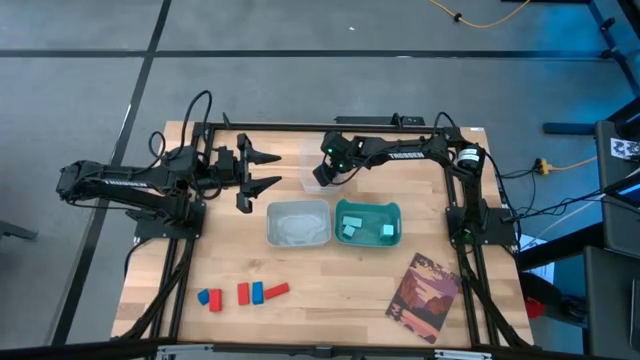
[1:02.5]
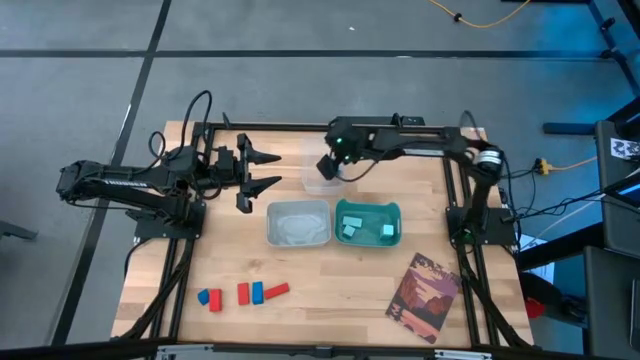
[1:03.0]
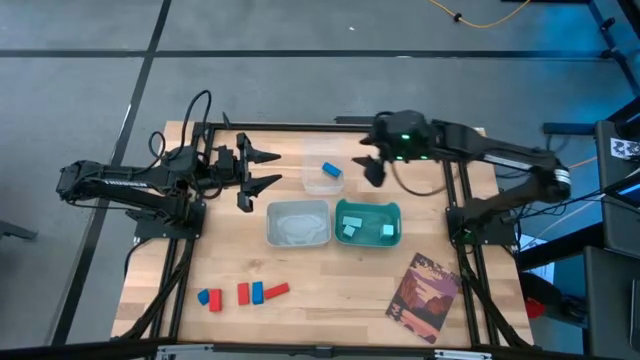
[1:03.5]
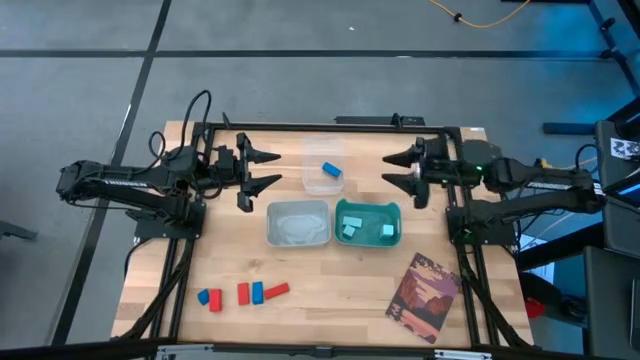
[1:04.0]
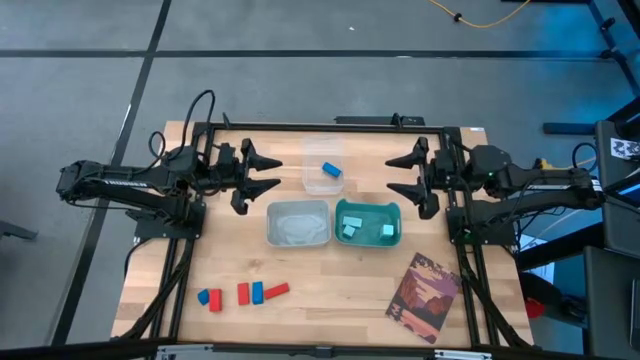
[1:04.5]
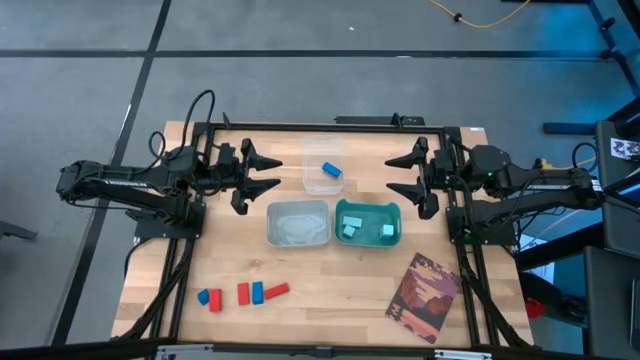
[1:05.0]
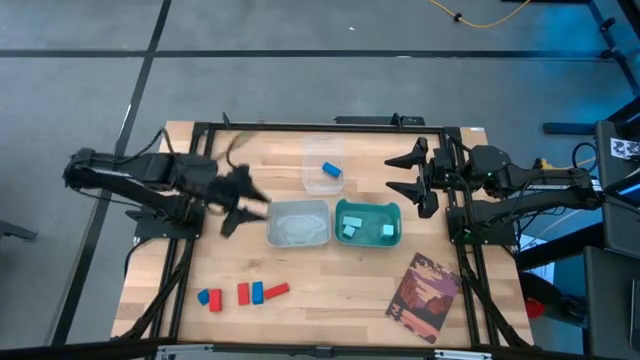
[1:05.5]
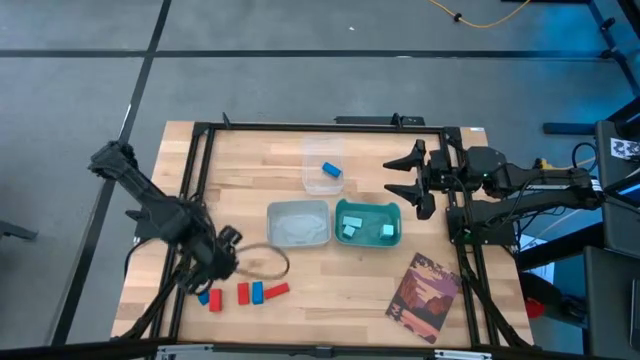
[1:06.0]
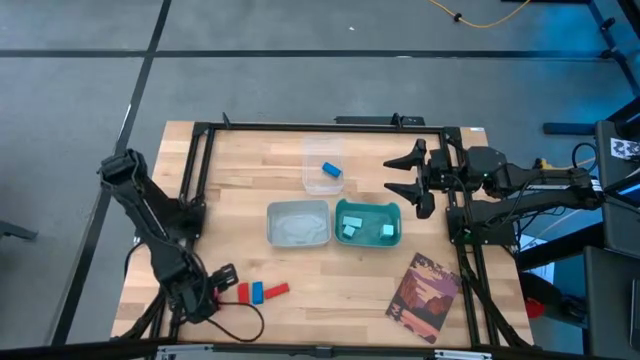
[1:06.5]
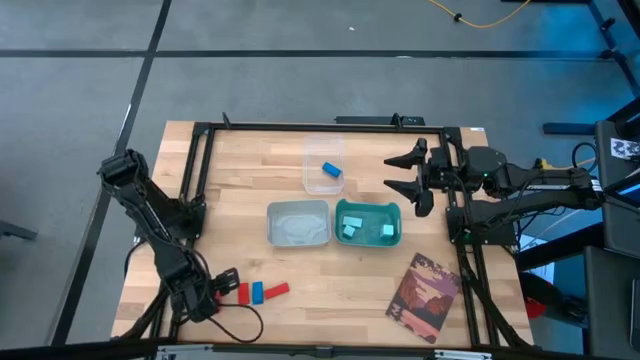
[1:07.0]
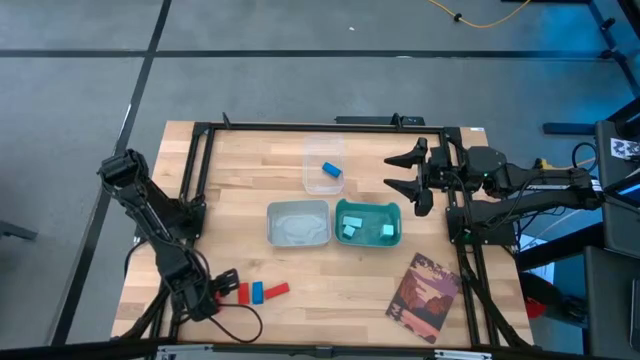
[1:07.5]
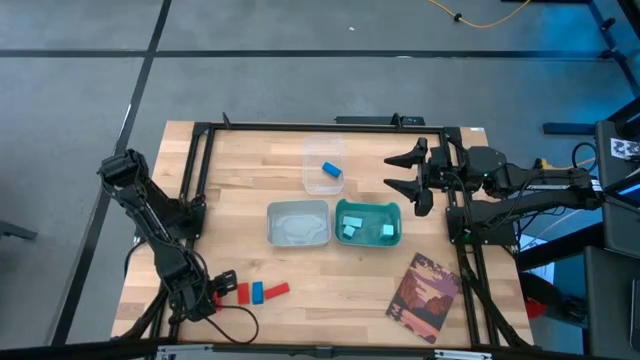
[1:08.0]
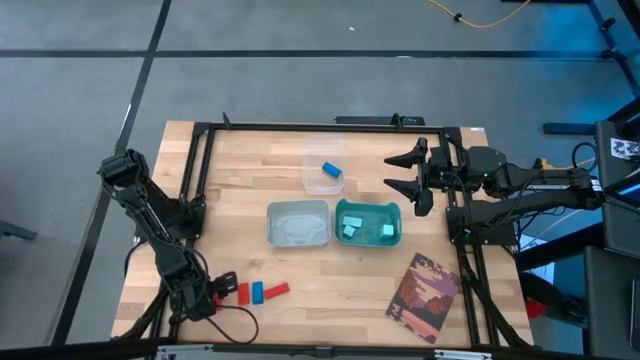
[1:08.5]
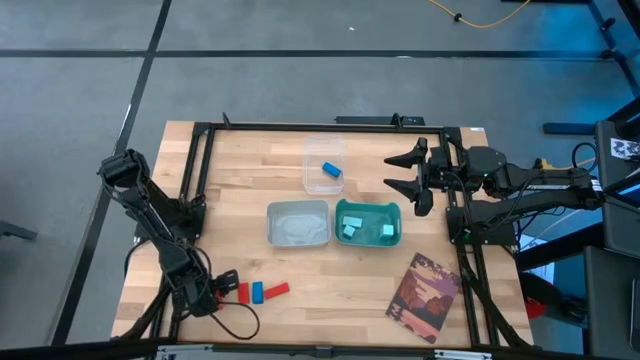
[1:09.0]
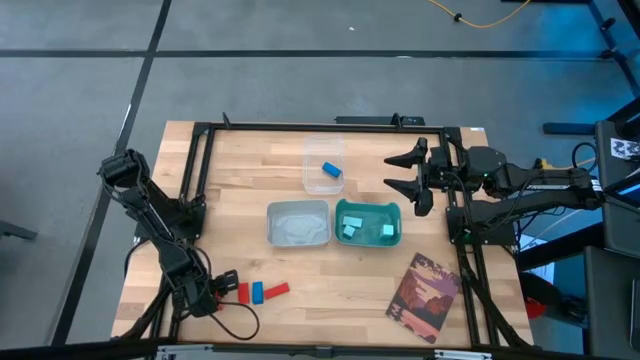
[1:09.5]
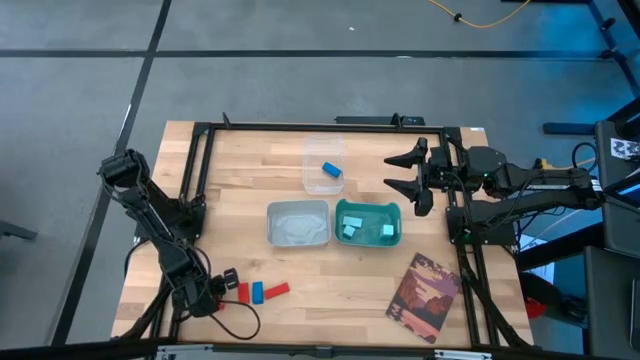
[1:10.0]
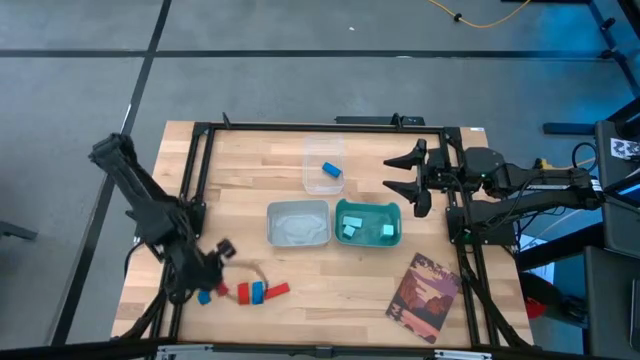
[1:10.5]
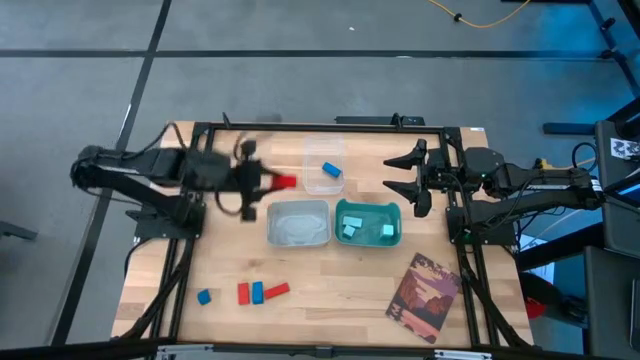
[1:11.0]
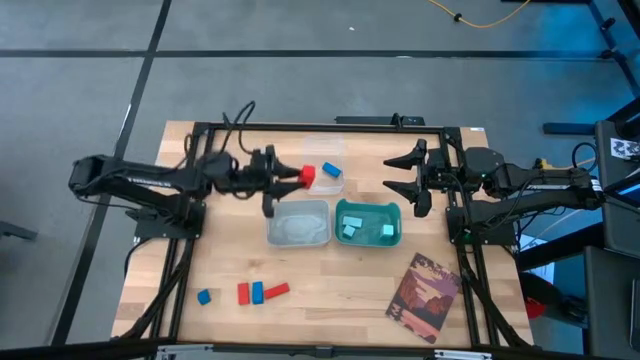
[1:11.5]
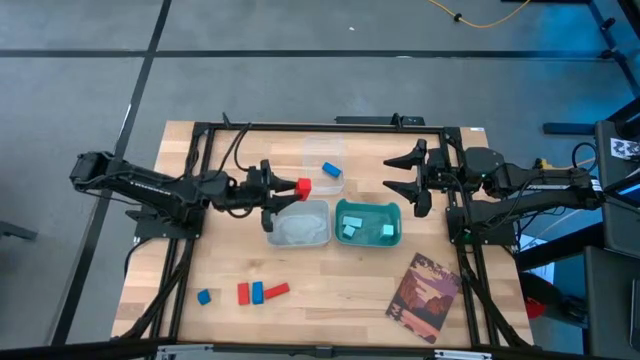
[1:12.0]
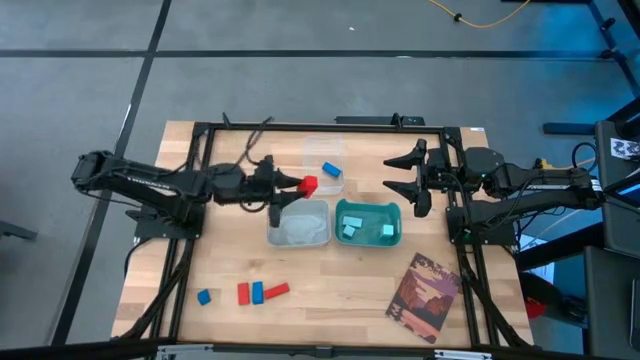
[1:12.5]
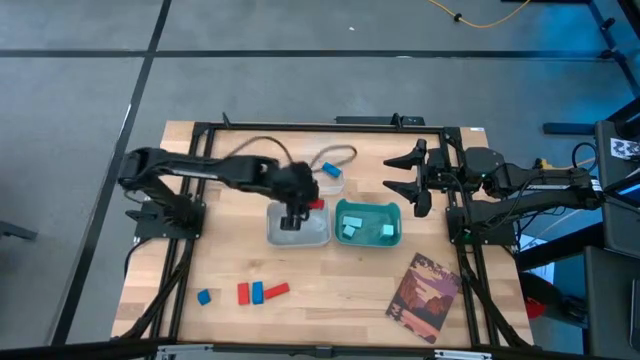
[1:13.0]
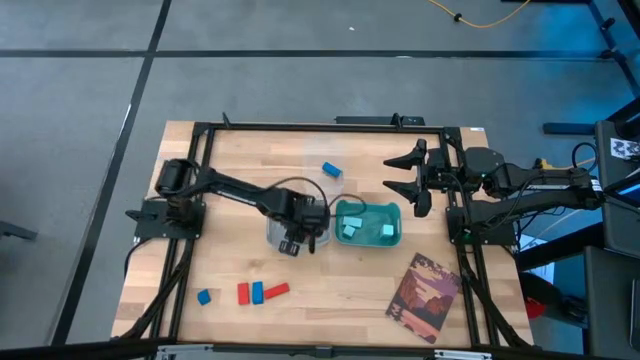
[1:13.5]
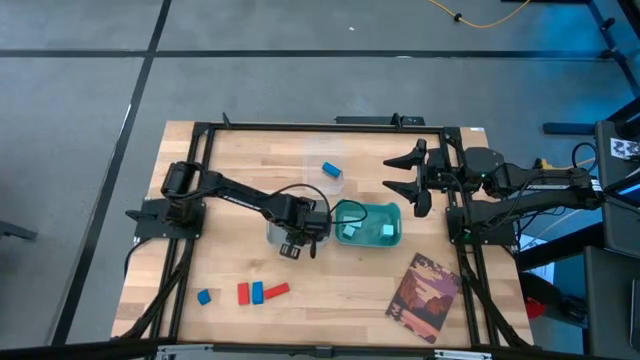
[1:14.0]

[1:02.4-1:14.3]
Task: Sort & place blocks by color
Put the left red block into the gray bin

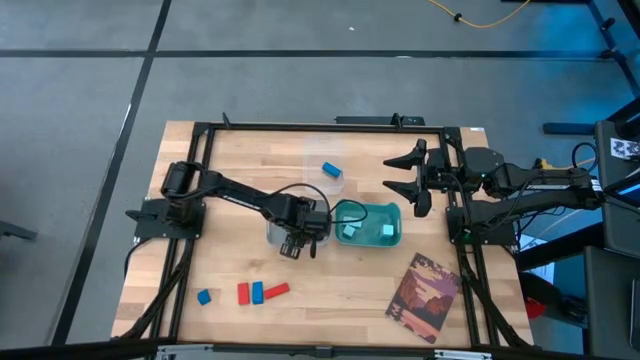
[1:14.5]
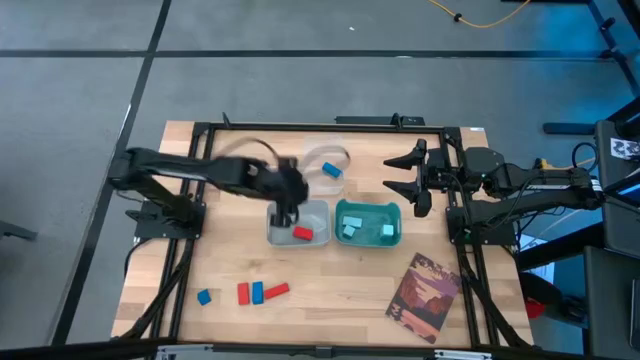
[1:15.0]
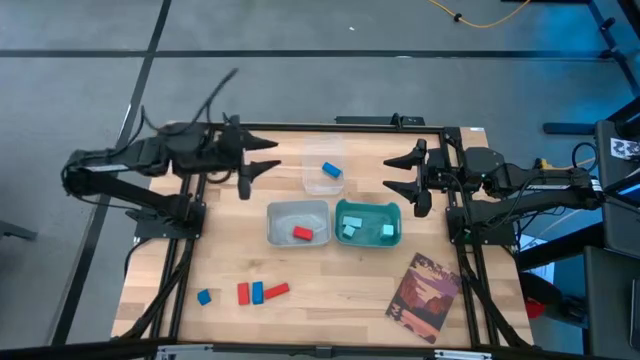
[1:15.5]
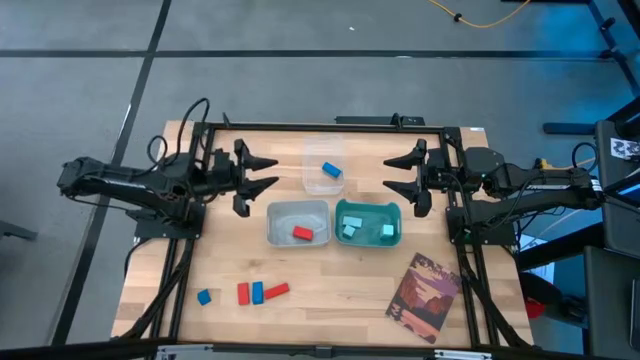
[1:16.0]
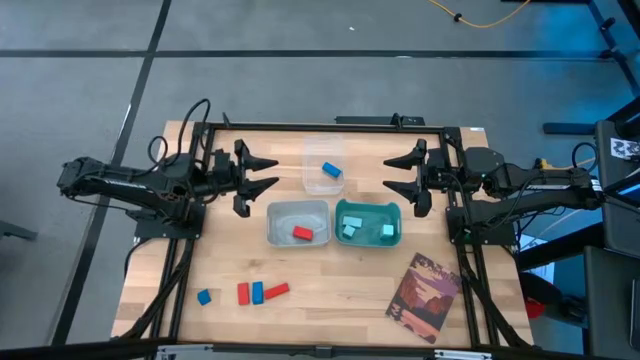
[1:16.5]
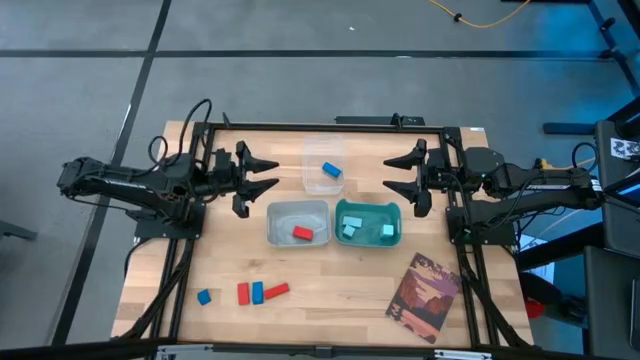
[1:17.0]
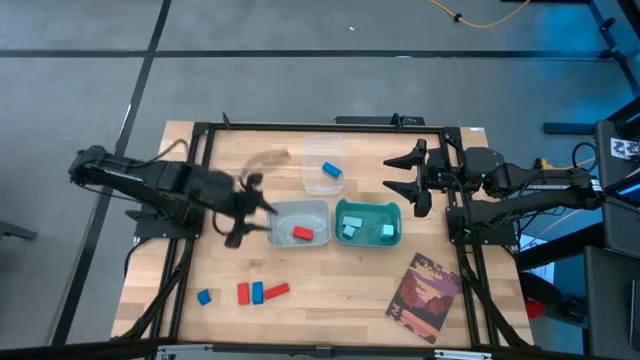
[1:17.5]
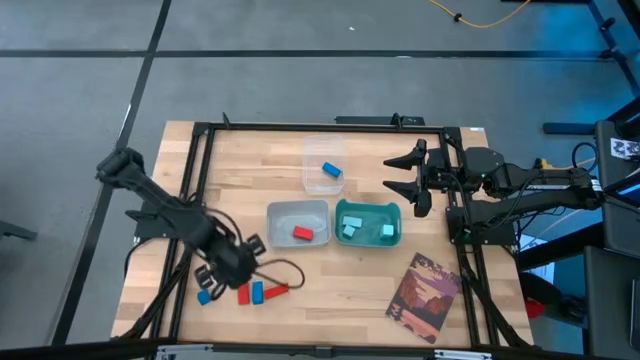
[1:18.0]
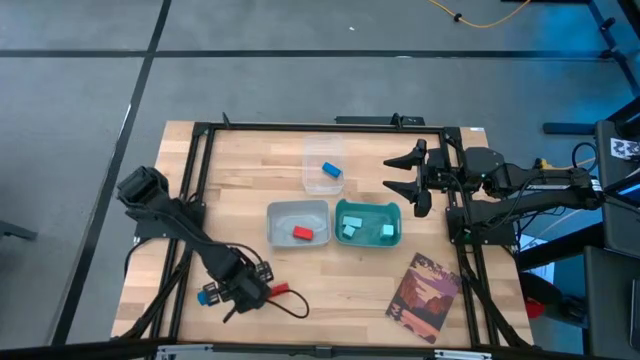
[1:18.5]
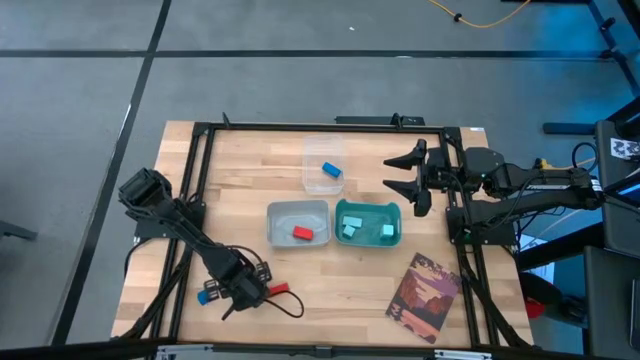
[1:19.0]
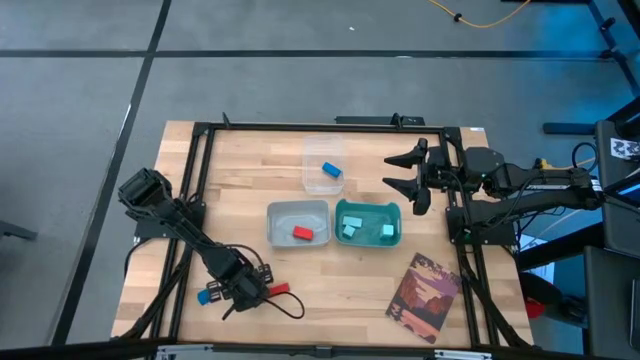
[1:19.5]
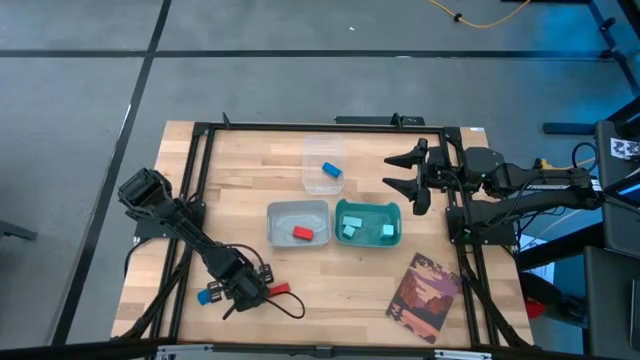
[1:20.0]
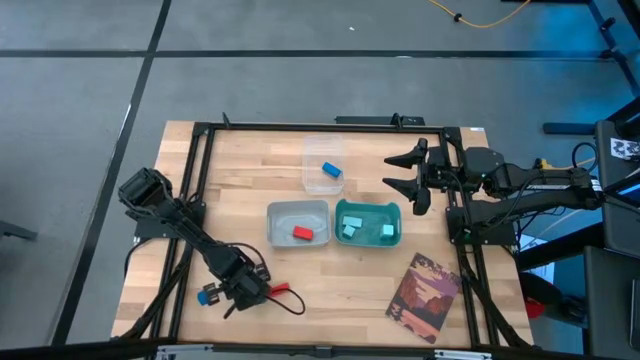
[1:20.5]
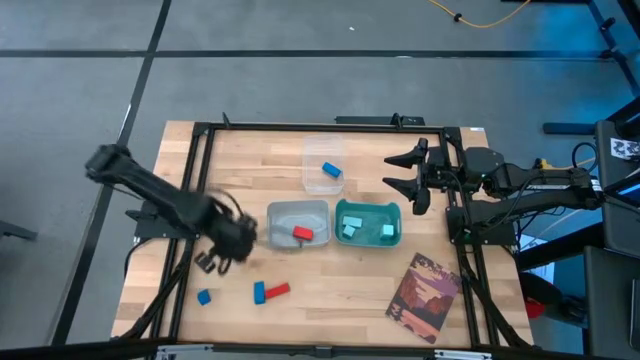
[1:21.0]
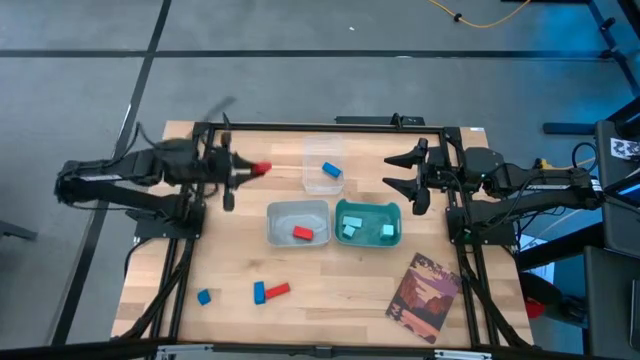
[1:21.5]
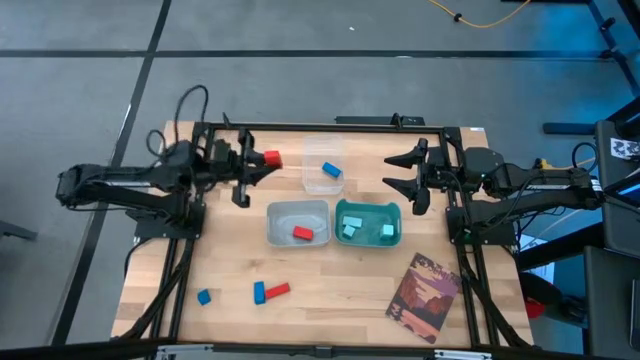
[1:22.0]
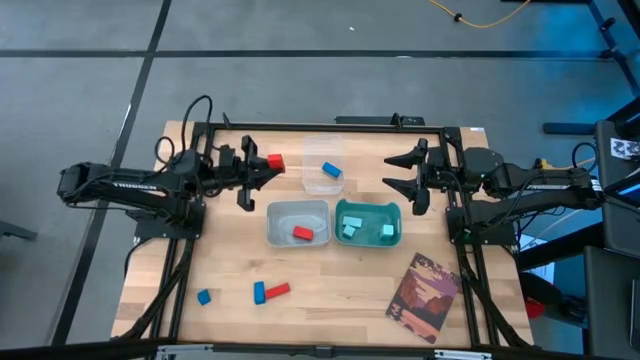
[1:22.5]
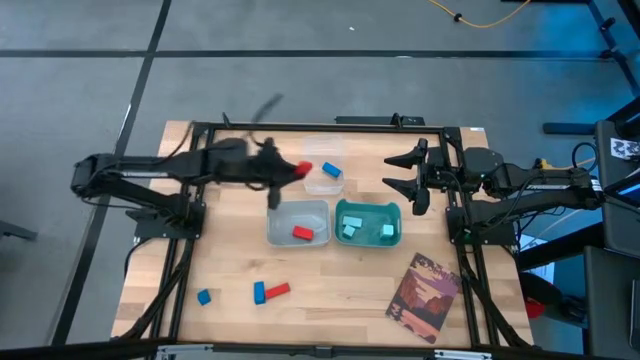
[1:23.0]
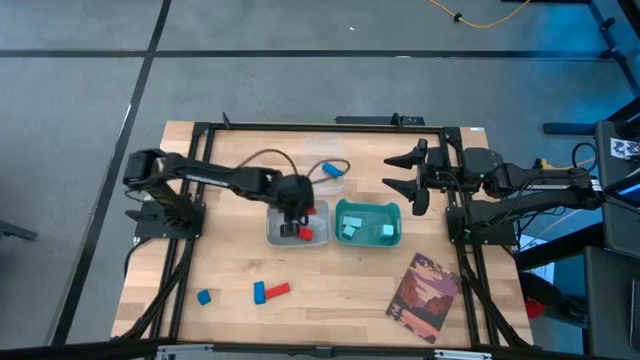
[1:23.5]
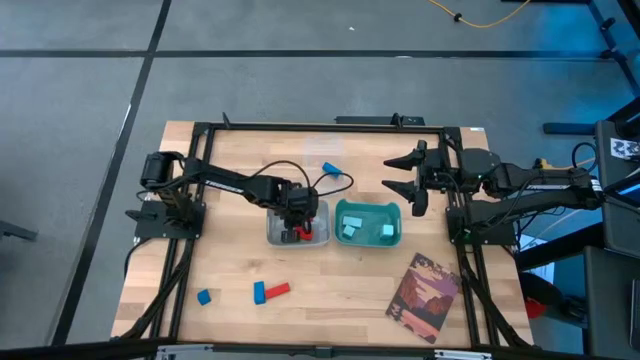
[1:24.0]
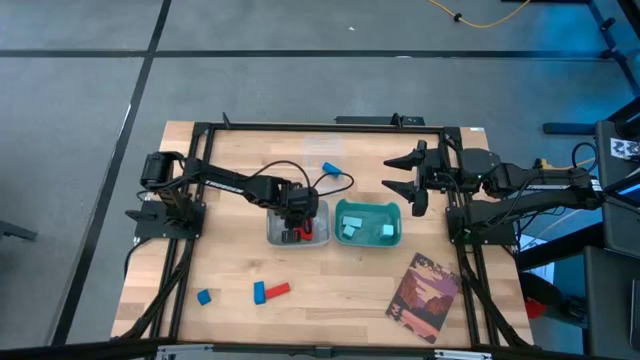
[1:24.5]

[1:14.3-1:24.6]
Put the left red block into the gray bin
